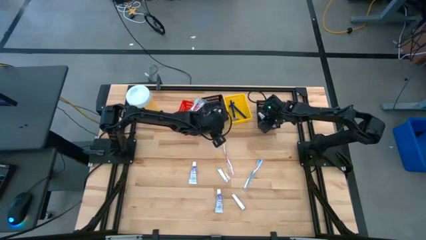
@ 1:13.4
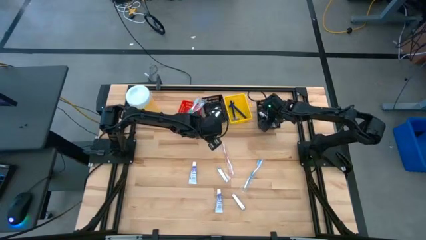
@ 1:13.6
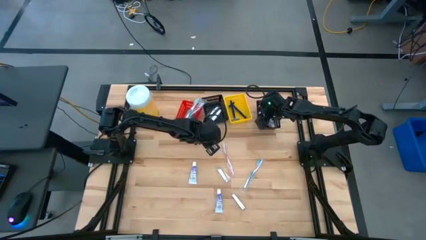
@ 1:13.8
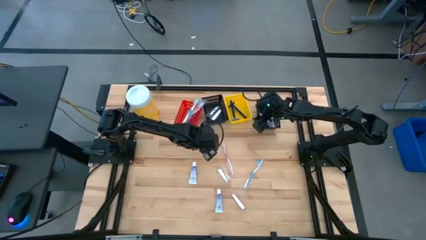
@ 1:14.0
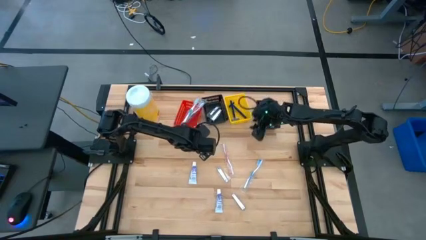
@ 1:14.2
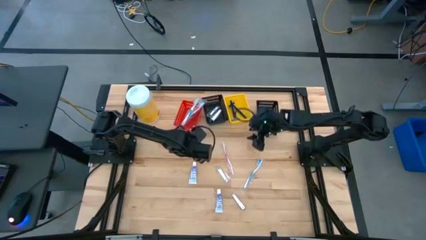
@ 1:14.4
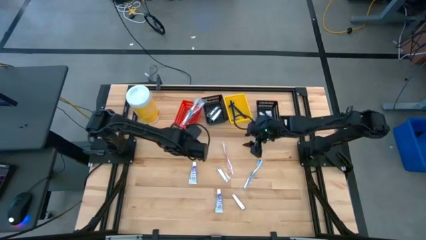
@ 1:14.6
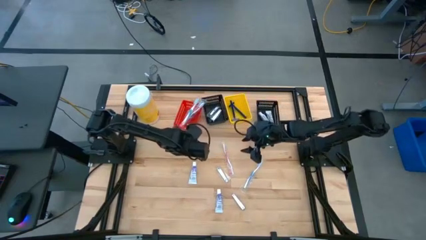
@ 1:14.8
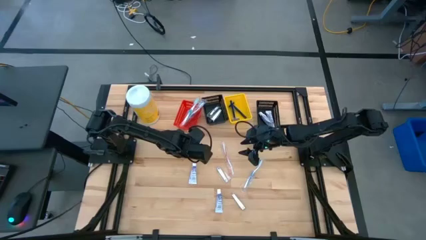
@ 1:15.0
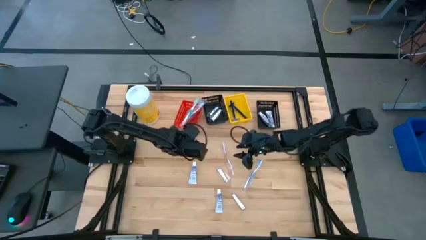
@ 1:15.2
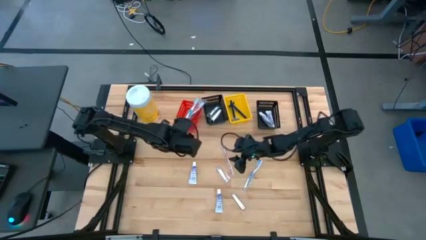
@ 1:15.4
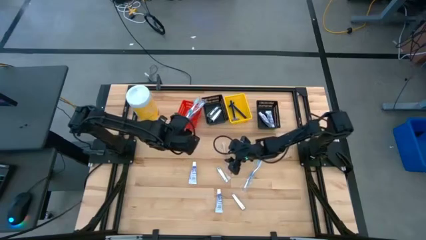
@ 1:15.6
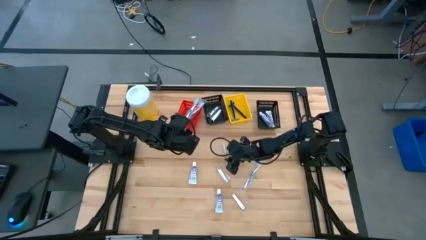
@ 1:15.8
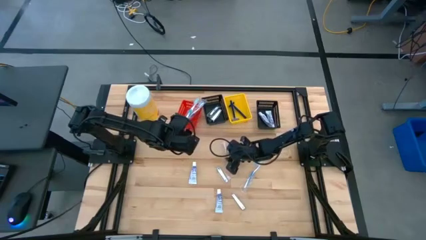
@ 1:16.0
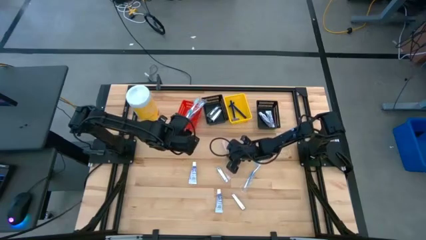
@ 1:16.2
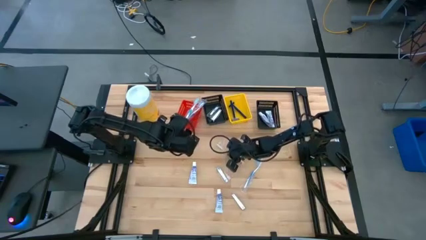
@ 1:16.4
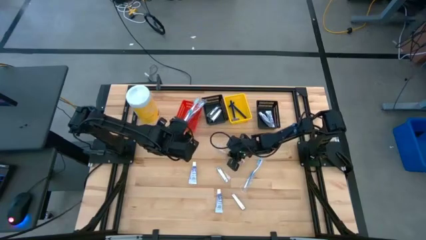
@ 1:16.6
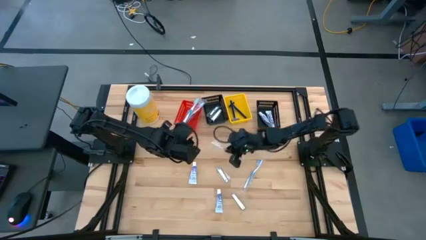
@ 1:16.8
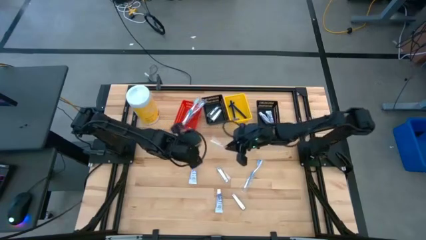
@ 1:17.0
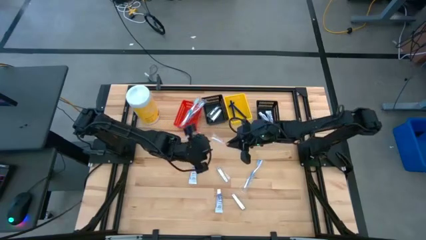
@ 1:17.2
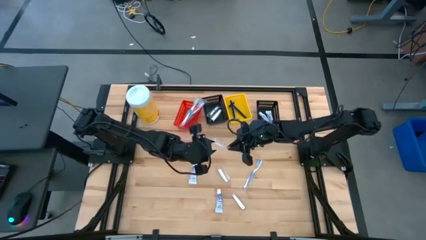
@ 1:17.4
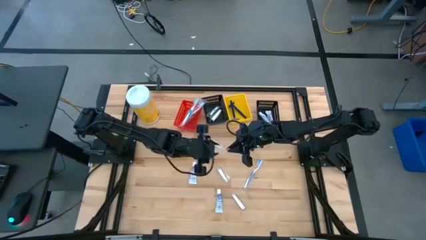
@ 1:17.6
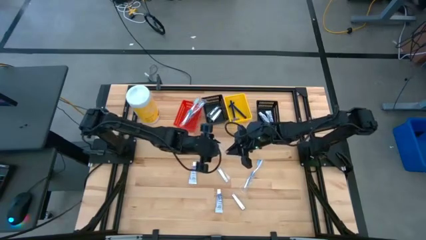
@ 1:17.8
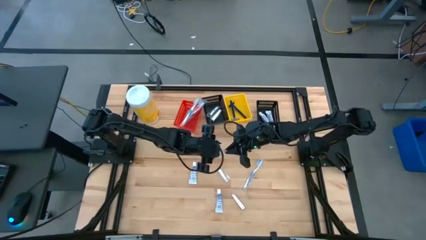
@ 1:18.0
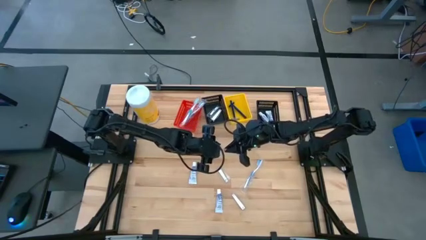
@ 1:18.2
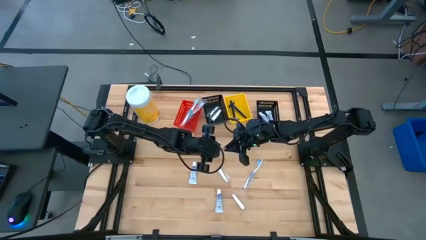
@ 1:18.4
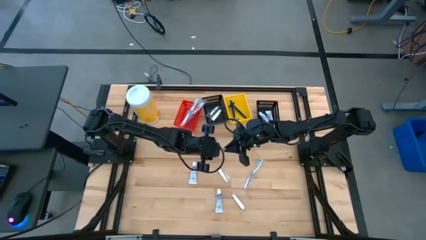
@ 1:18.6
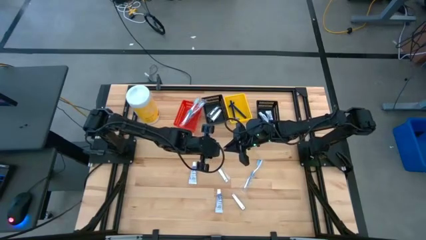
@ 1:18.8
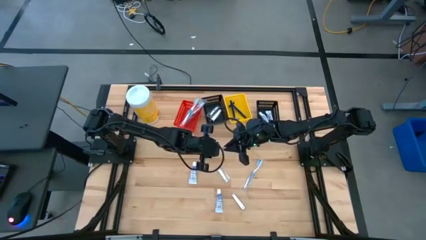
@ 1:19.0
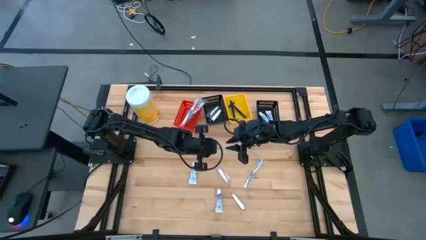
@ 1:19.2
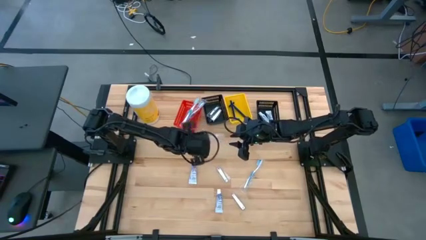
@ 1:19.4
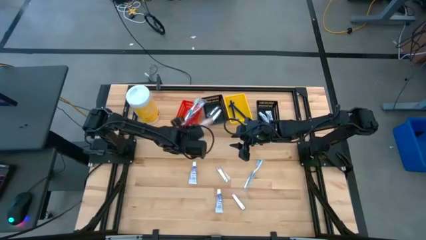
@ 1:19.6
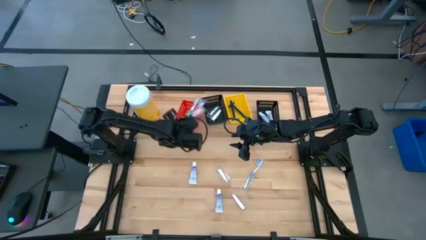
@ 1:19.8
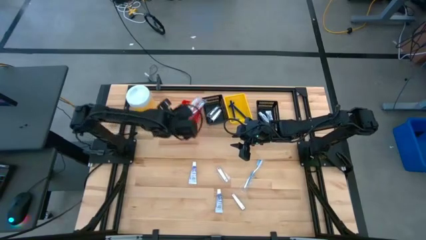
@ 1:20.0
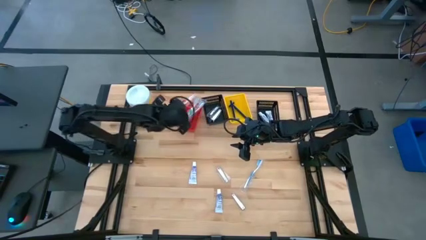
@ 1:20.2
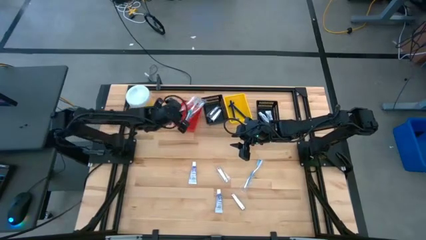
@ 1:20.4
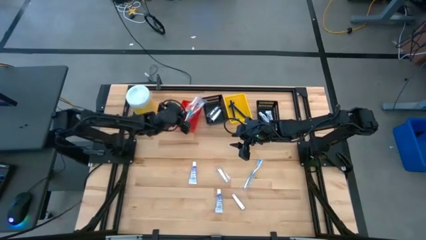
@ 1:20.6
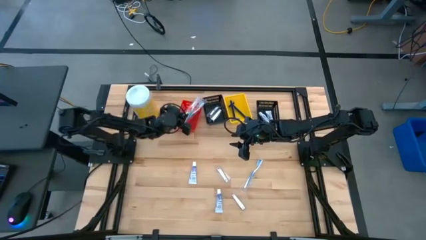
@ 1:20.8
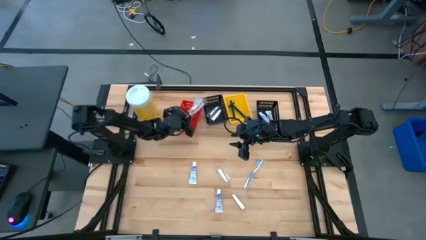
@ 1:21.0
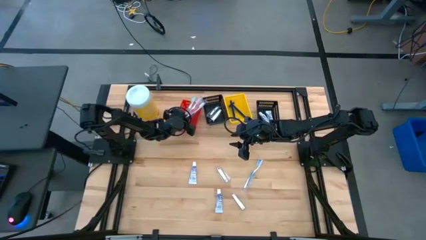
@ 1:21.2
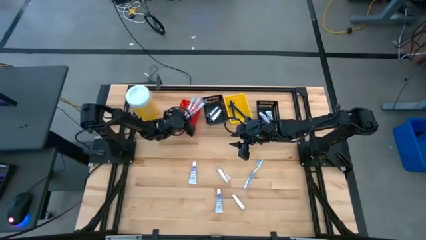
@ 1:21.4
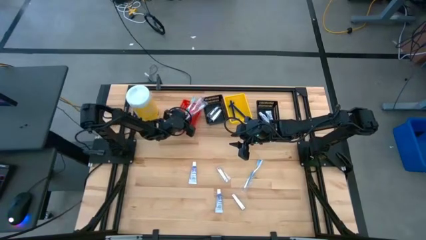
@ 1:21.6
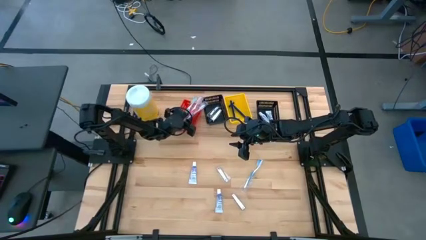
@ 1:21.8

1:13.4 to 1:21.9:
Task: Pick & Place Travel size toiletries
Put the red toothbrush into the red bin

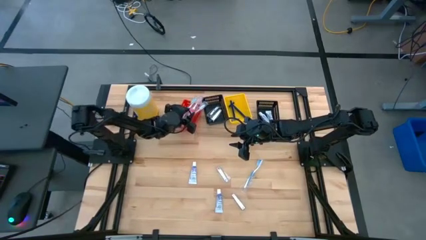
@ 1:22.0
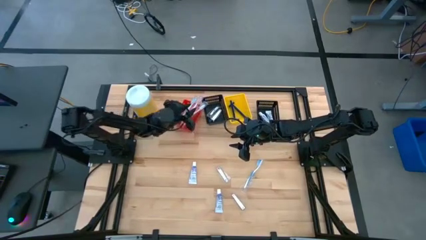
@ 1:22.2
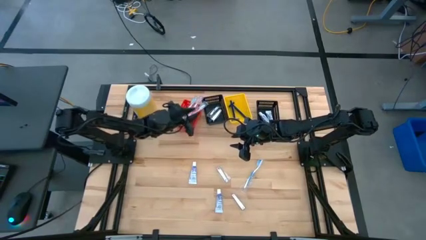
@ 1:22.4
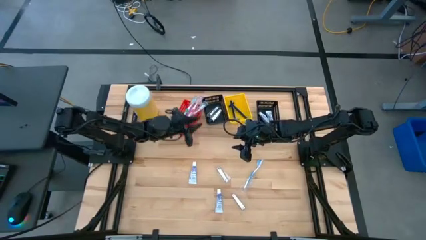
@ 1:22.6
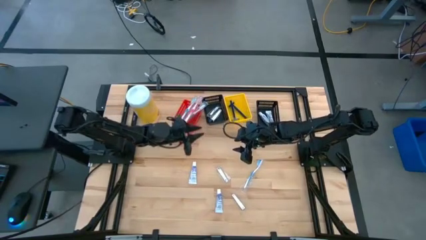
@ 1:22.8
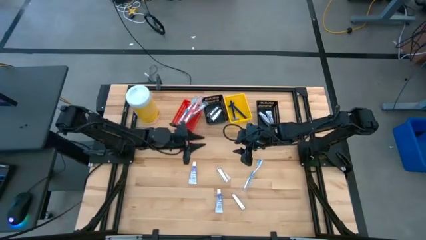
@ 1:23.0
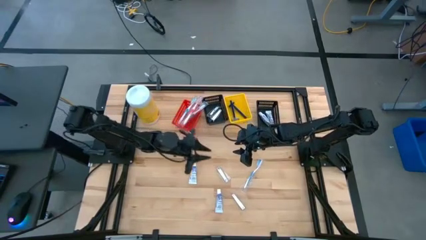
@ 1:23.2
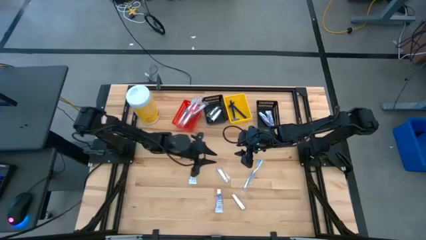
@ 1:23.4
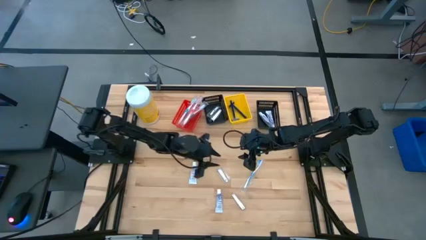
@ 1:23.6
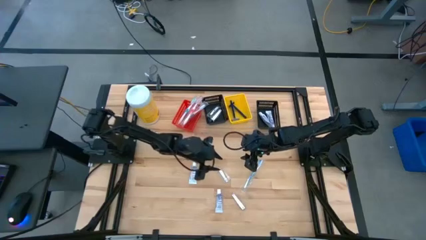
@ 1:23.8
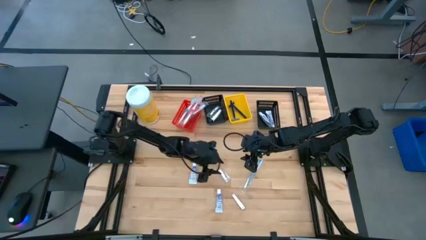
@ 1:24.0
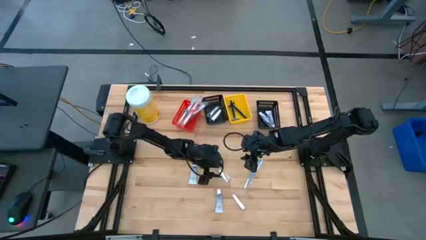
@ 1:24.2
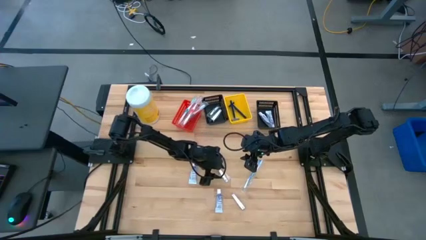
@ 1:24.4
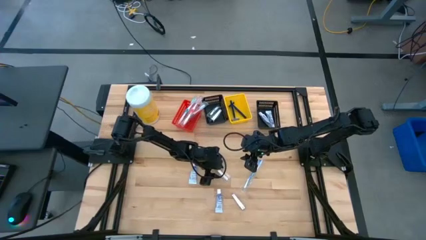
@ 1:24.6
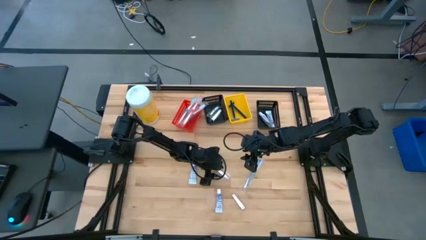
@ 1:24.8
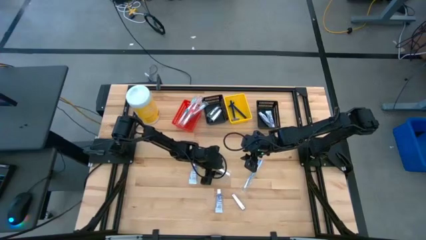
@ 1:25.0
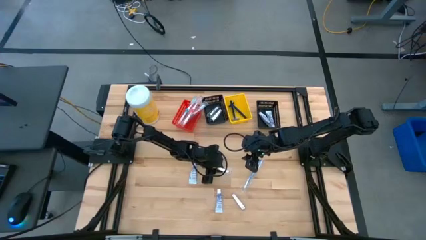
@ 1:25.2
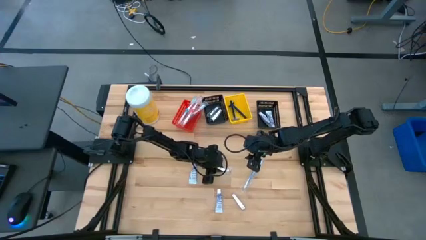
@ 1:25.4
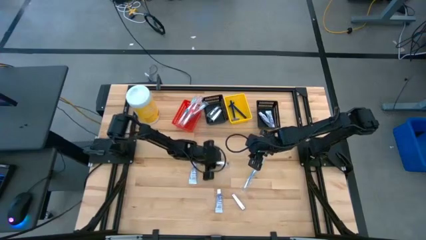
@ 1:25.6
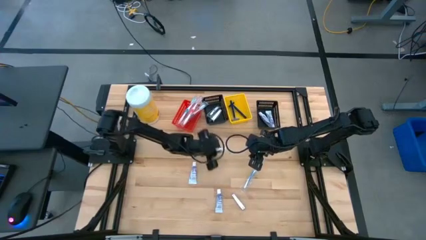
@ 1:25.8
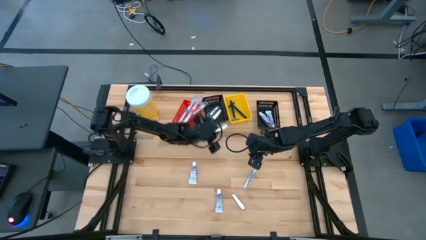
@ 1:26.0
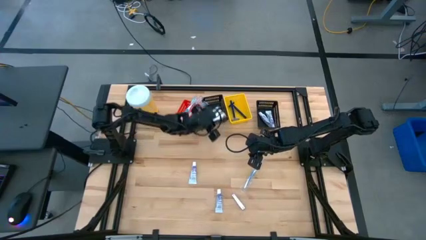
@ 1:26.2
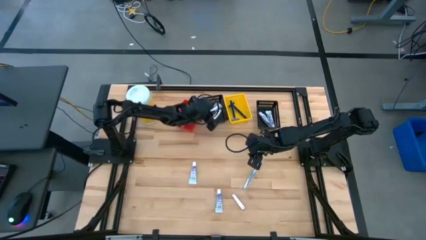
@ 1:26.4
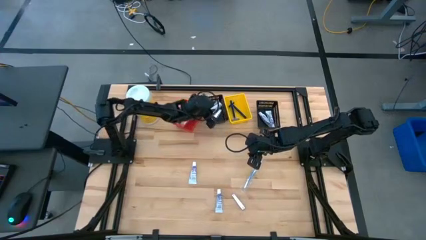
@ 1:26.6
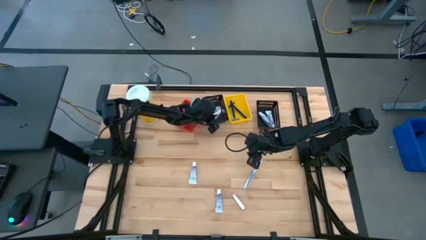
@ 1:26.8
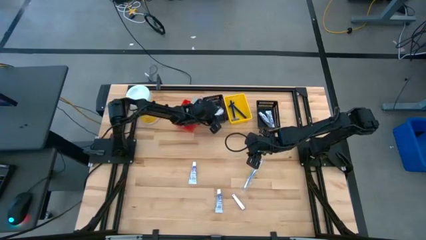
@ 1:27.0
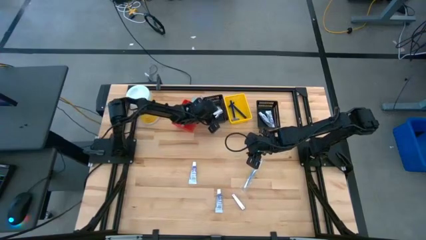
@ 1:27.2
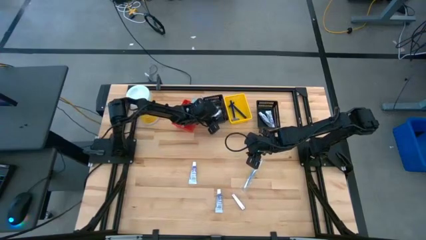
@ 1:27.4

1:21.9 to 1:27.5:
Put the silver nail cutter into the left black bin
